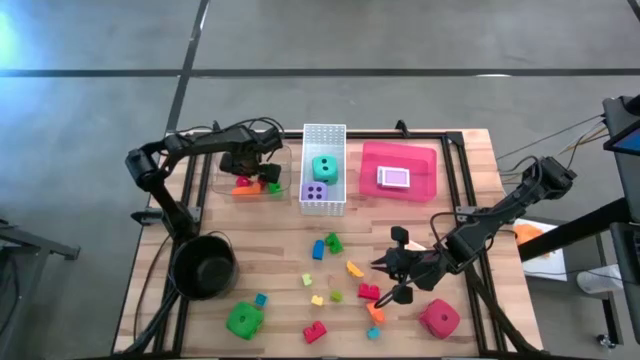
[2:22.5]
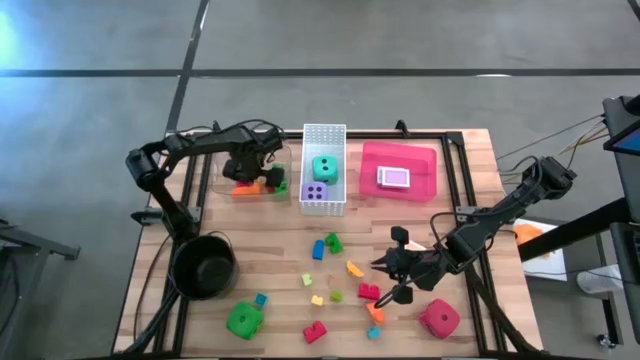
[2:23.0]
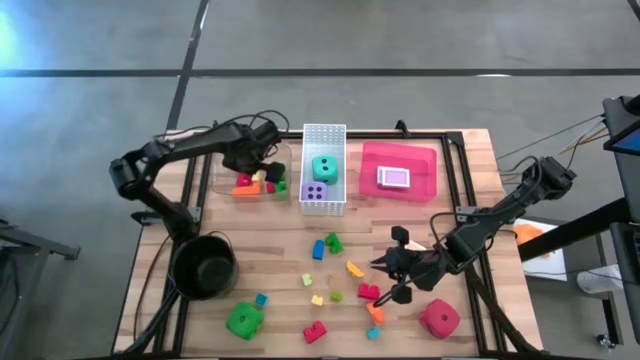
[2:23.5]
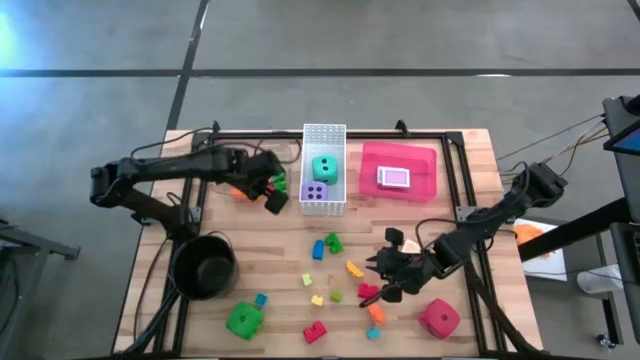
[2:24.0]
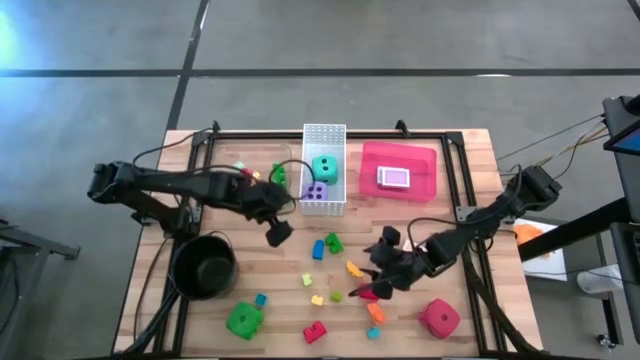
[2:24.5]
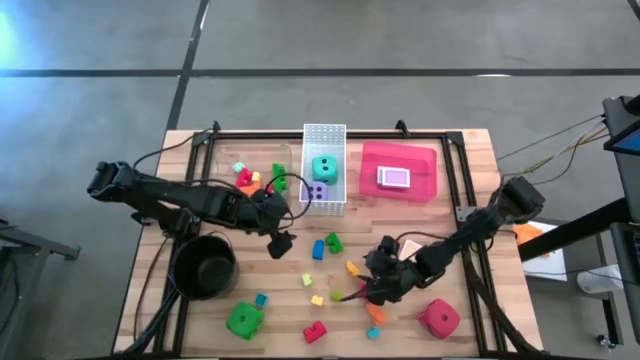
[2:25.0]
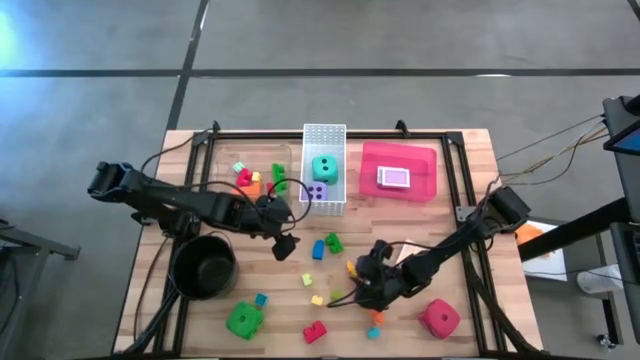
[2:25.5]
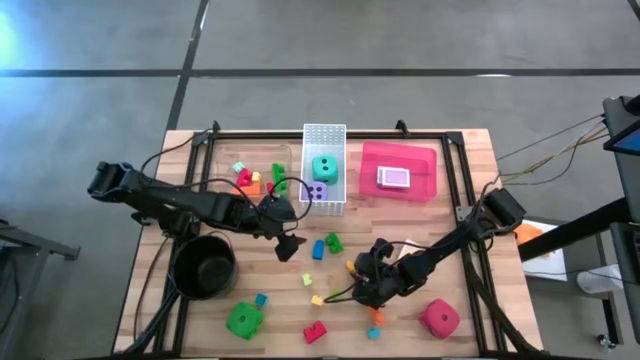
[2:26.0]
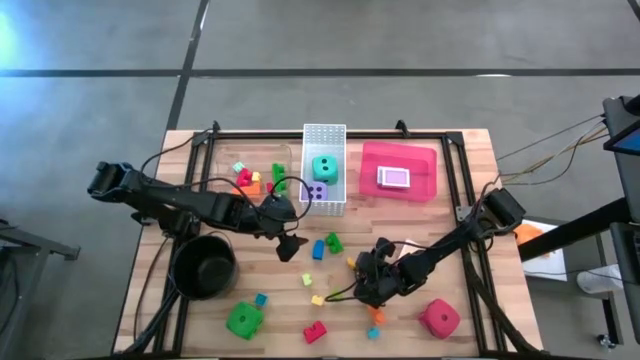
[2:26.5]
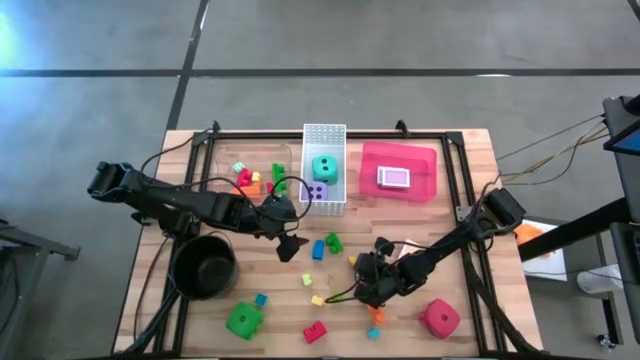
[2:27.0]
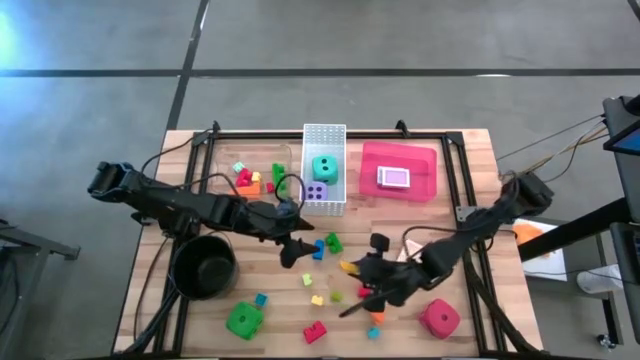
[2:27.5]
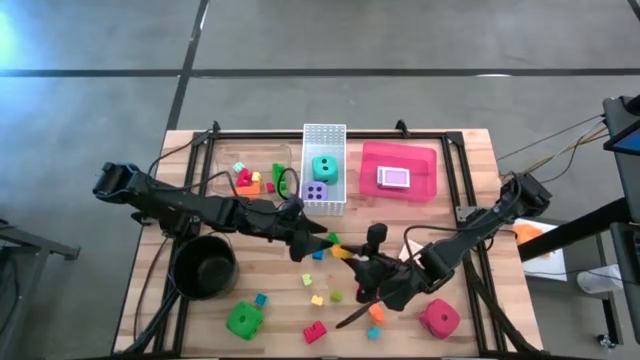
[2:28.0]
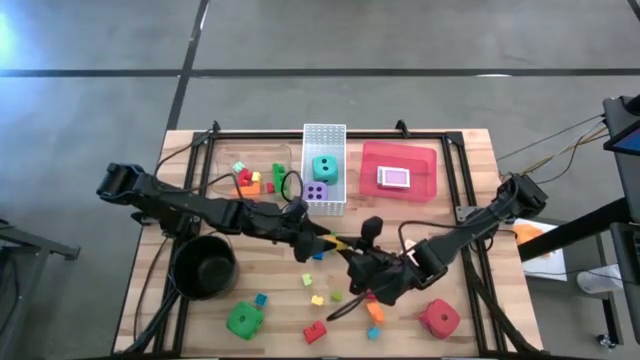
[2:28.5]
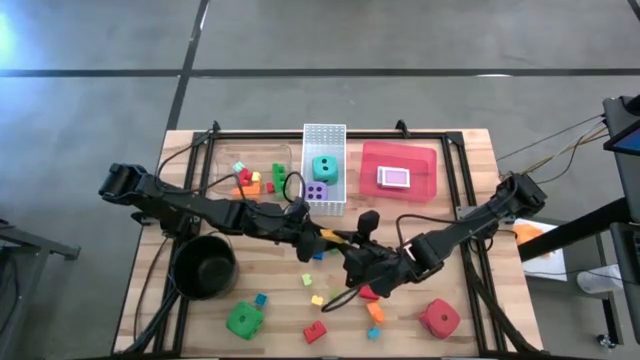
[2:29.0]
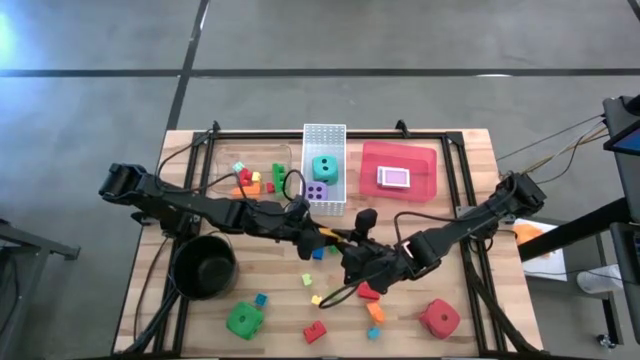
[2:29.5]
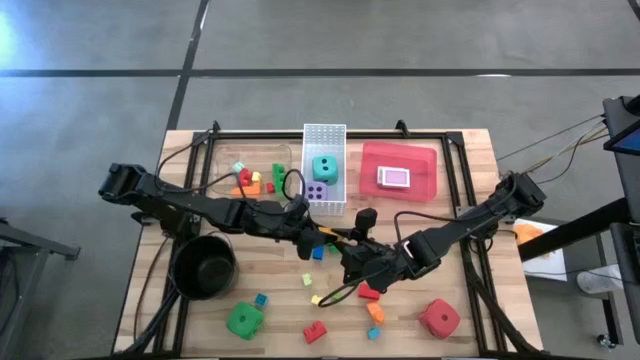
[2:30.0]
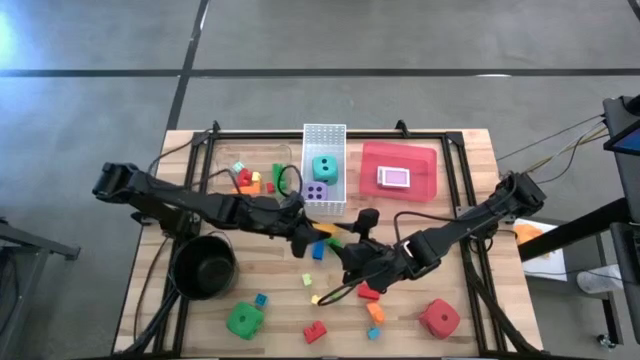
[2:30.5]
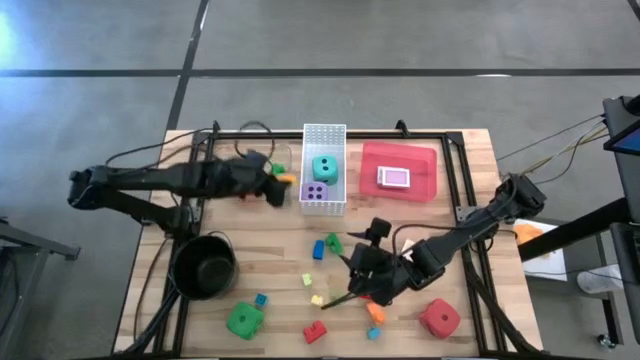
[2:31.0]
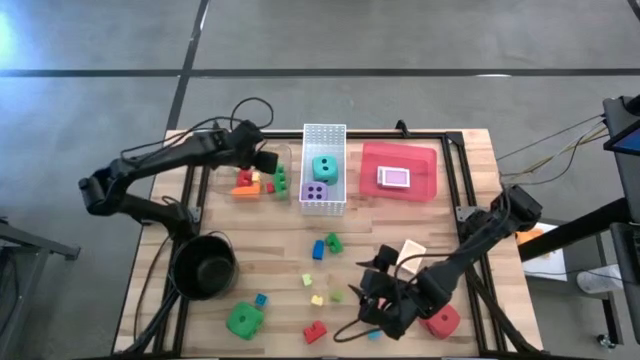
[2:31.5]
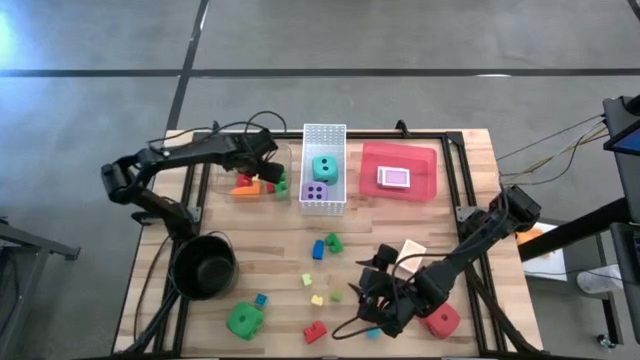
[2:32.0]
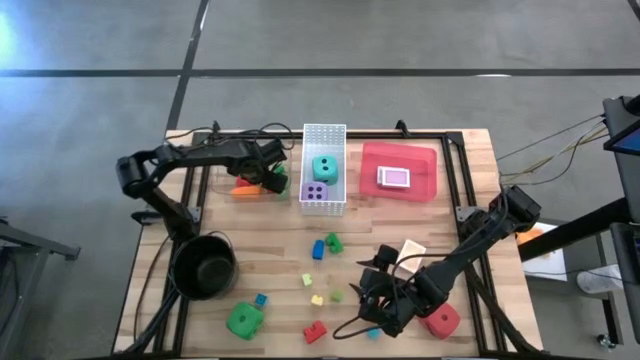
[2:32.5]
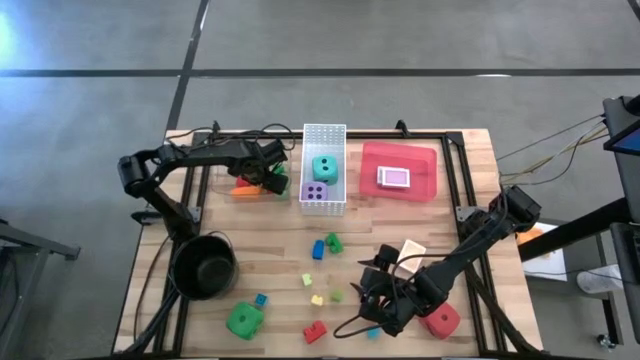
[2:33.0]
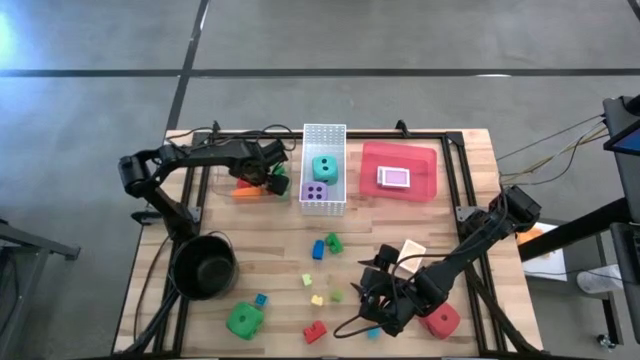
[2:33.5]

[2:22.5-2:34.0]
Task: Pick & Place Toys
Put the yellow game piece into the transparent bin

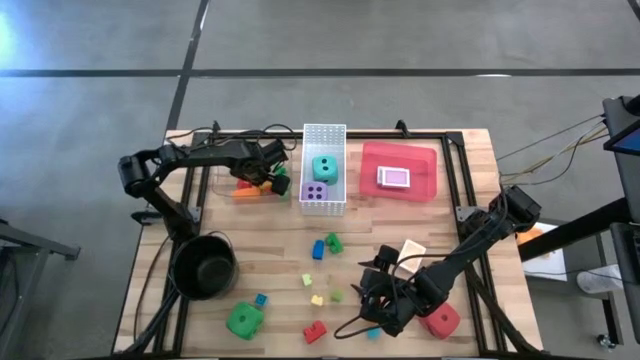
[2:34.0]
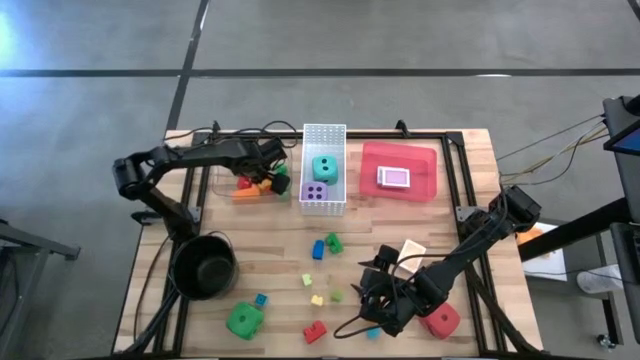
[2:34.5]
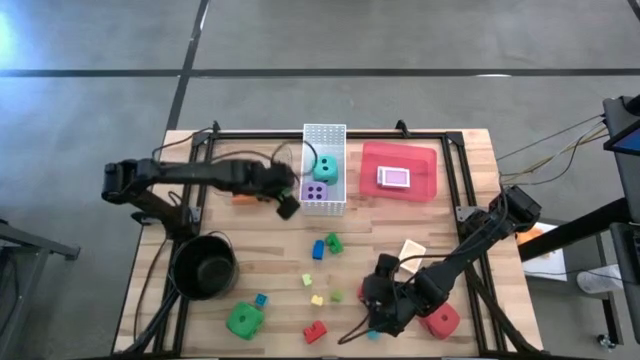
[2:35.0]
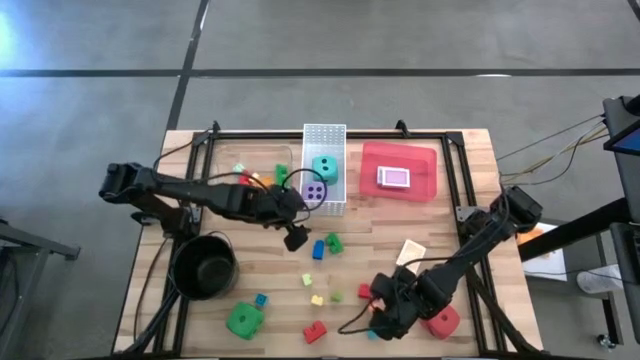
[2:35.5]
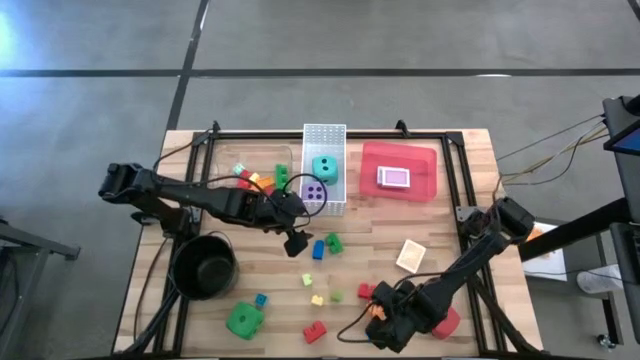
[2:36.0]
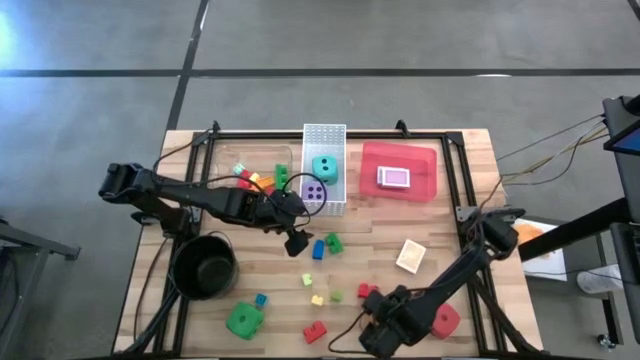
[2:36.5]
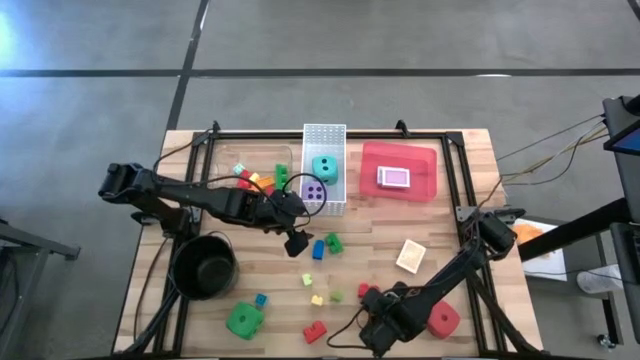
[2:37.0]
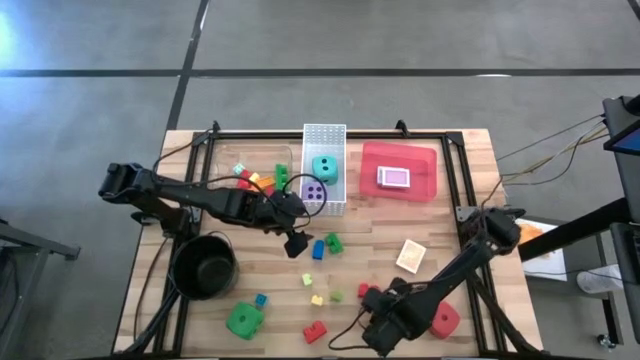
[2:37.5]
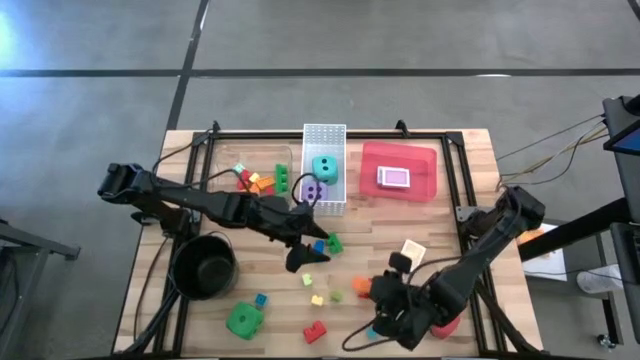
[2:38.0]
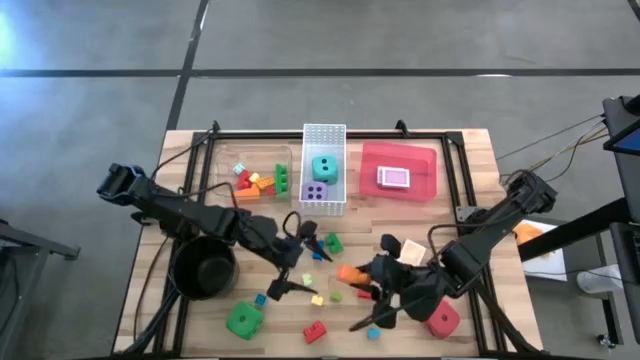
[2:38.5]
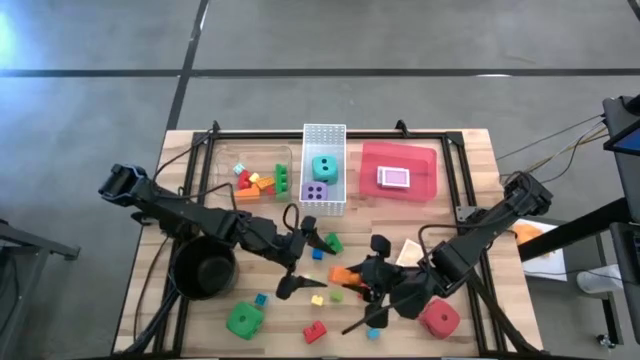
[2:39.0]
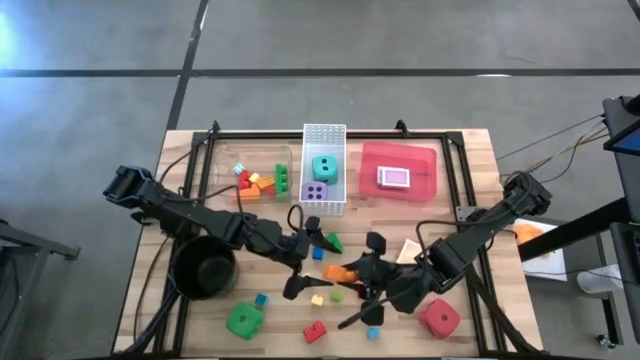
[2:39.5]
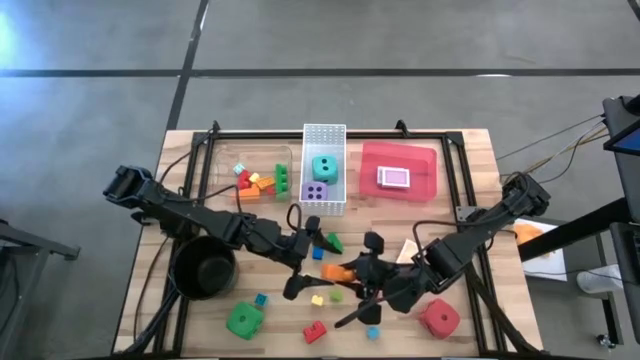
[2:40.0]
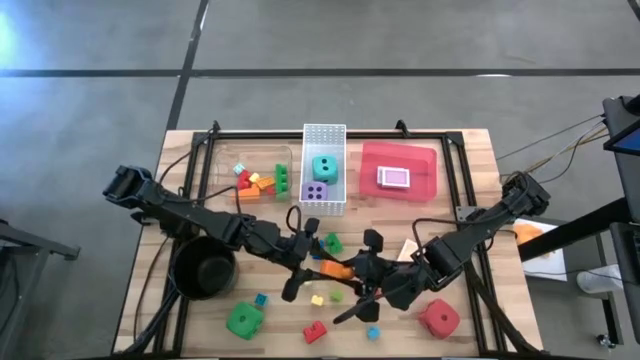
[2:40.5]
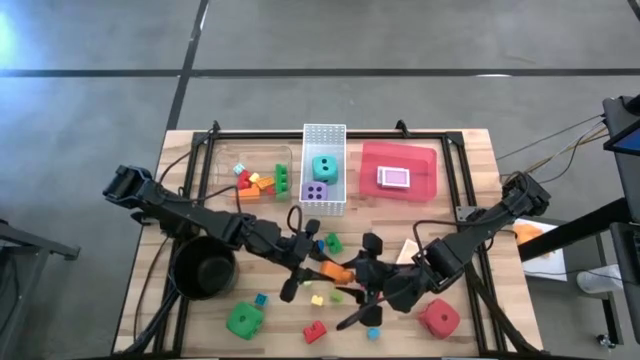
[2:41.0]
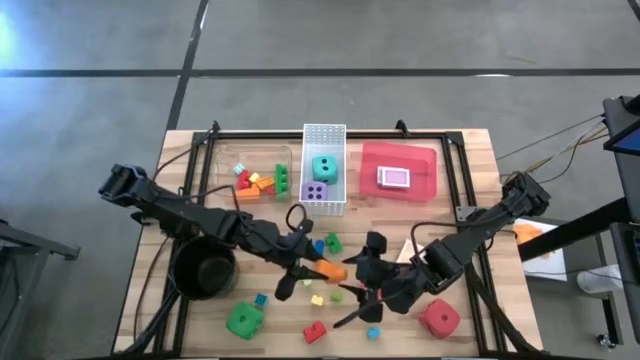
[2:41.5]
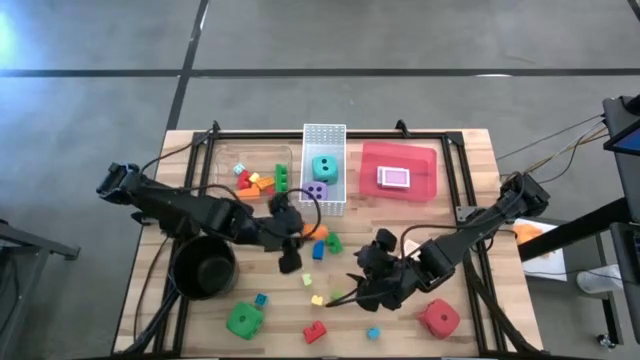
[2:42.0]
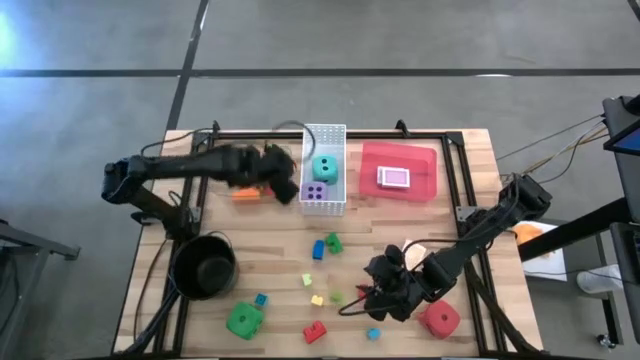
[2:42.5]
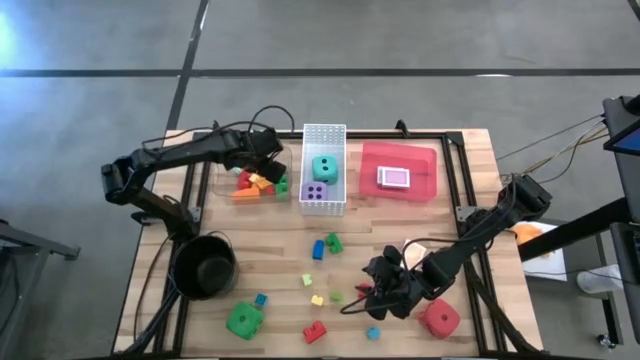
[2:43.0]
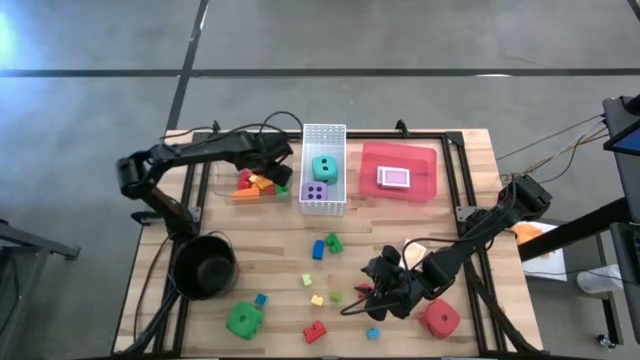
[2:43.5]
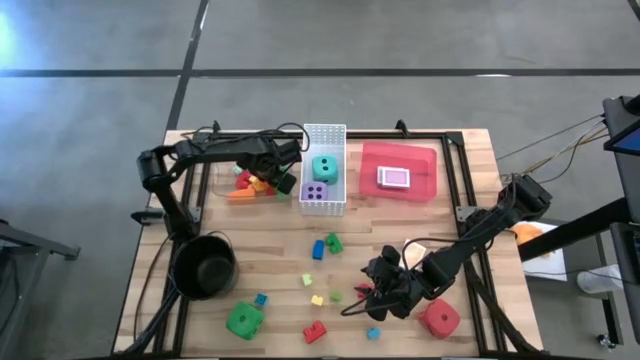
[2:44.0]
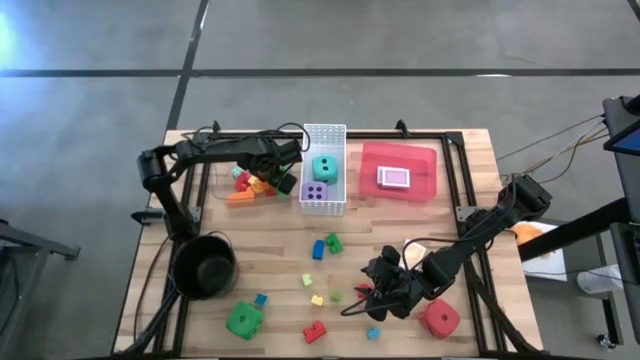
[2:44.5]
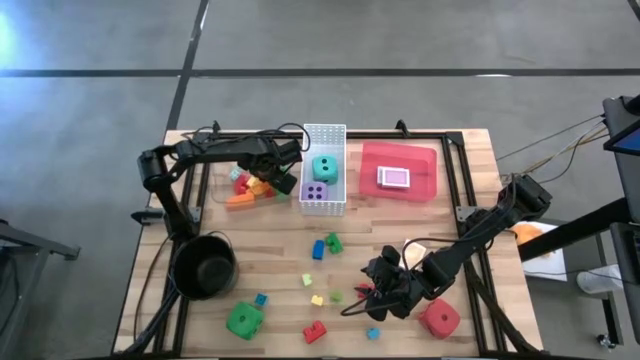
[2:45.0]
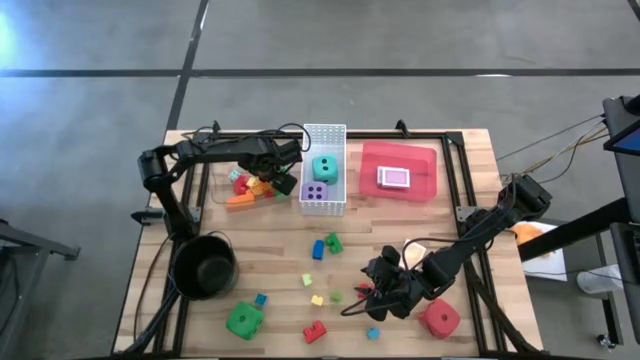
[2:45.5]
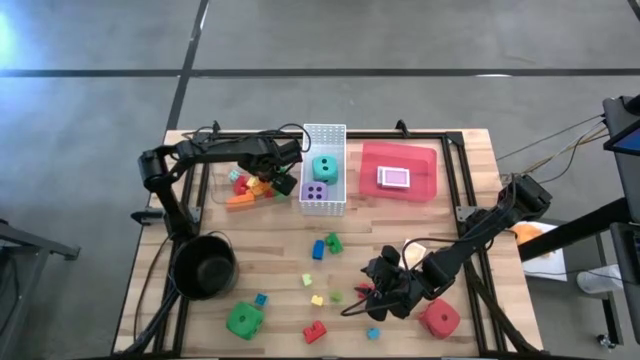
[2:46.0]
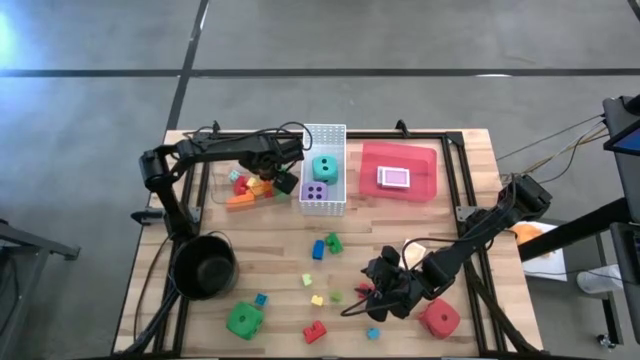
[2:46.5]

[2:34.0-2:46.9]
Put the orange game piece into the transparent bin
